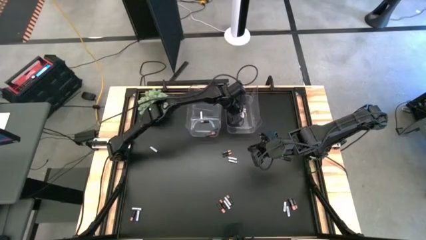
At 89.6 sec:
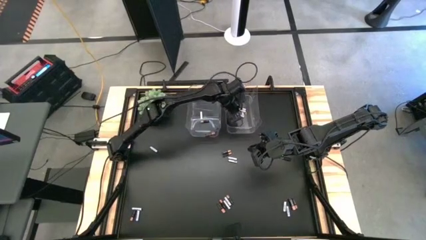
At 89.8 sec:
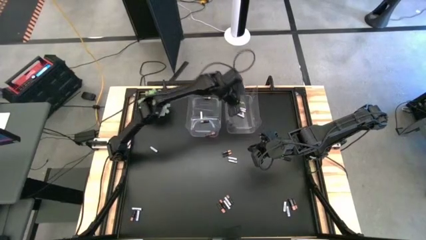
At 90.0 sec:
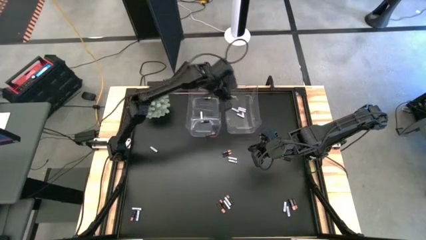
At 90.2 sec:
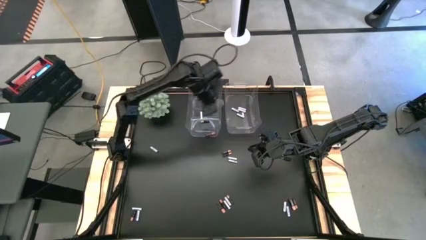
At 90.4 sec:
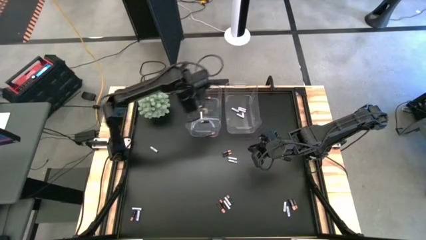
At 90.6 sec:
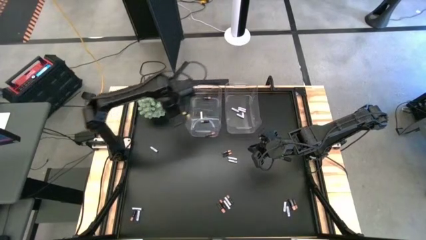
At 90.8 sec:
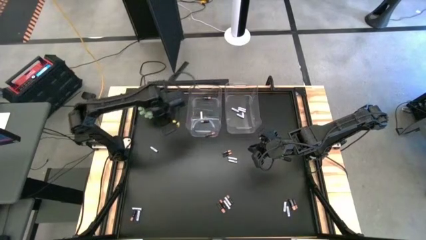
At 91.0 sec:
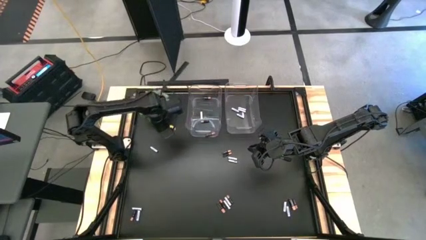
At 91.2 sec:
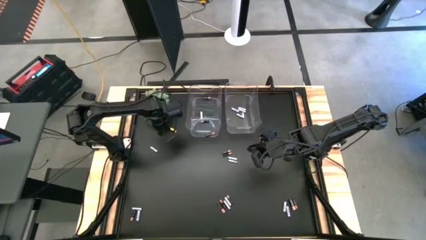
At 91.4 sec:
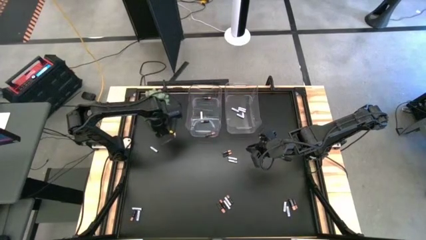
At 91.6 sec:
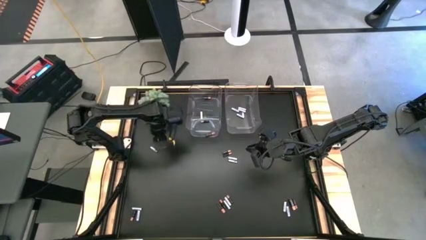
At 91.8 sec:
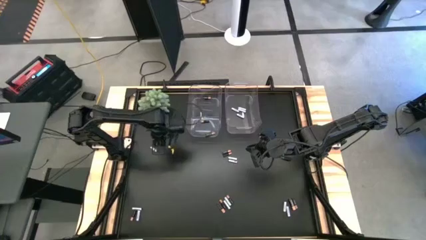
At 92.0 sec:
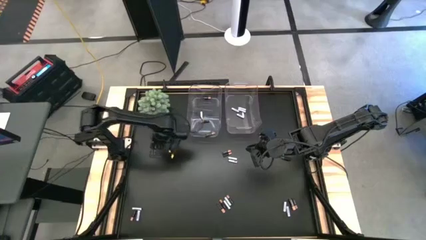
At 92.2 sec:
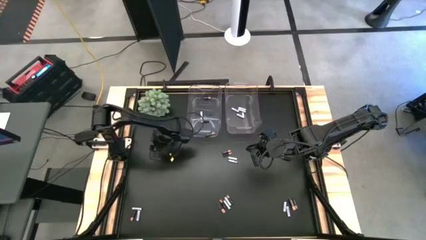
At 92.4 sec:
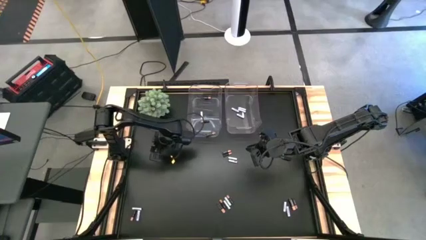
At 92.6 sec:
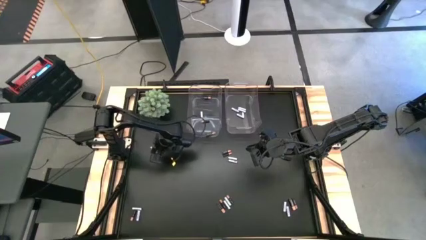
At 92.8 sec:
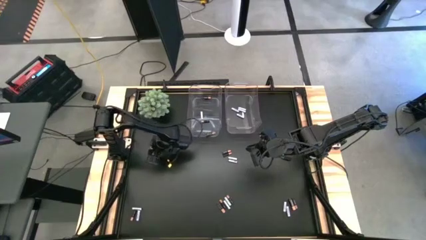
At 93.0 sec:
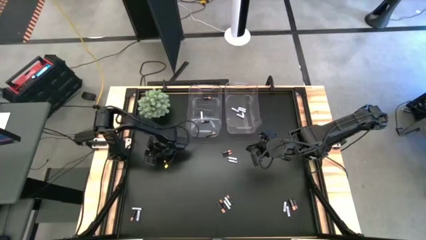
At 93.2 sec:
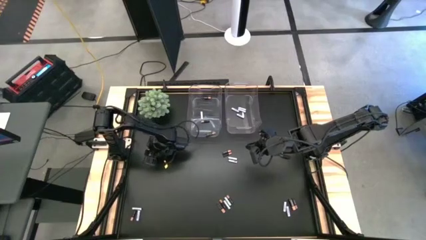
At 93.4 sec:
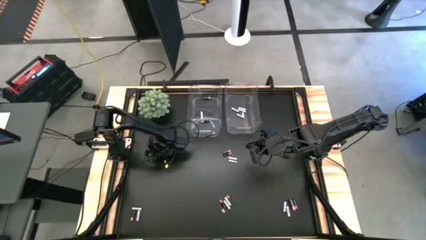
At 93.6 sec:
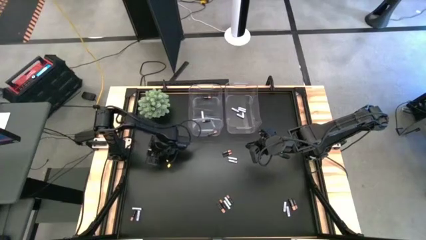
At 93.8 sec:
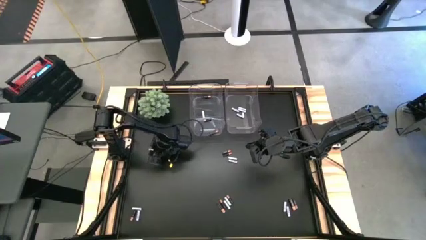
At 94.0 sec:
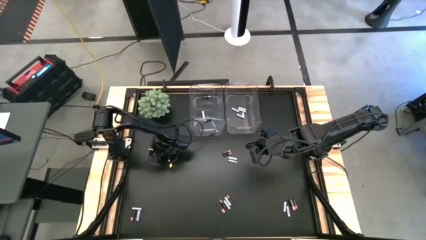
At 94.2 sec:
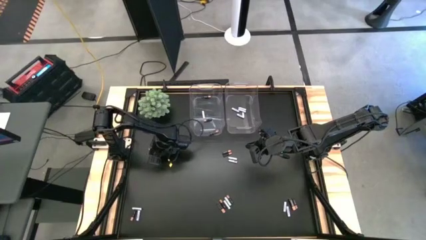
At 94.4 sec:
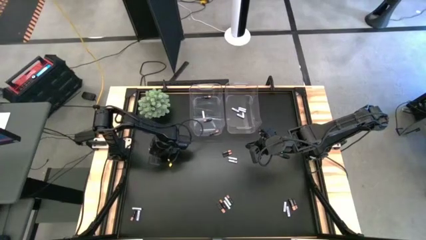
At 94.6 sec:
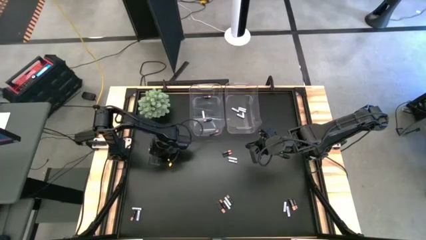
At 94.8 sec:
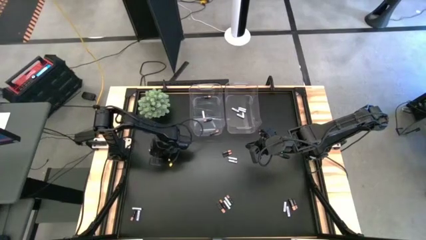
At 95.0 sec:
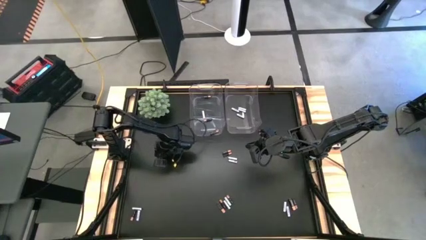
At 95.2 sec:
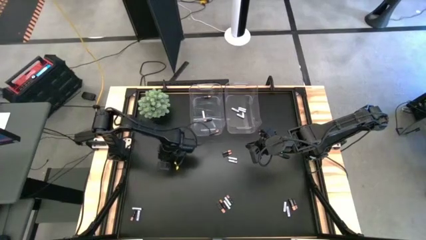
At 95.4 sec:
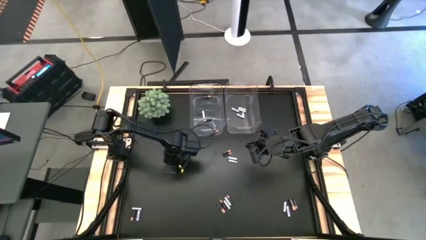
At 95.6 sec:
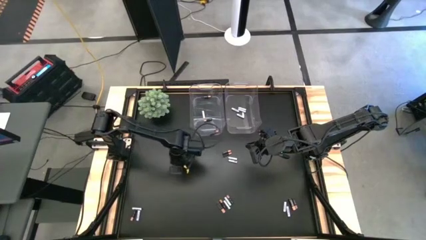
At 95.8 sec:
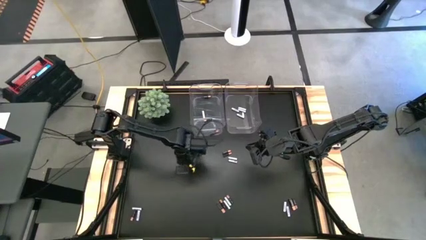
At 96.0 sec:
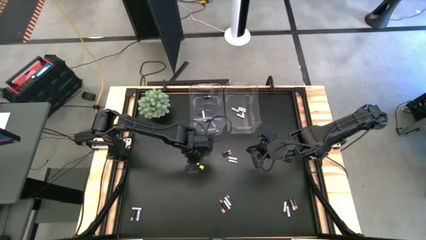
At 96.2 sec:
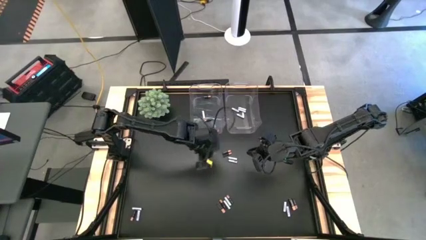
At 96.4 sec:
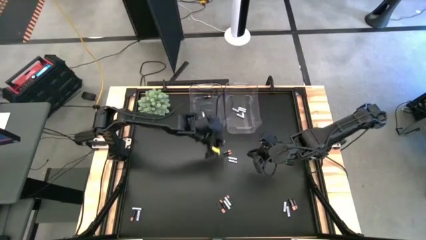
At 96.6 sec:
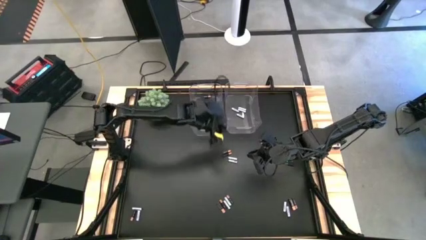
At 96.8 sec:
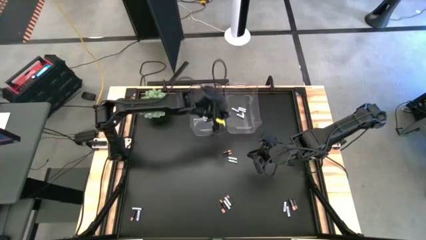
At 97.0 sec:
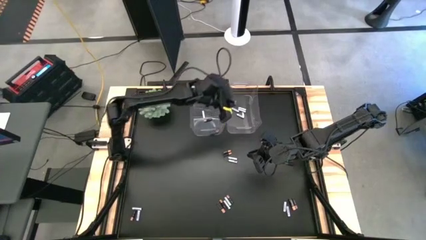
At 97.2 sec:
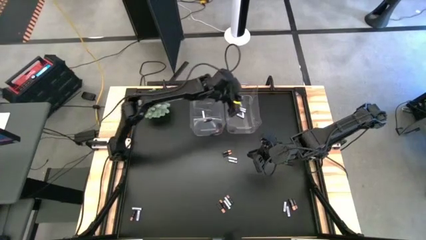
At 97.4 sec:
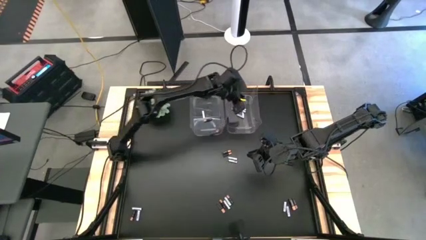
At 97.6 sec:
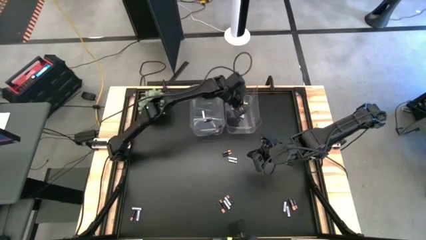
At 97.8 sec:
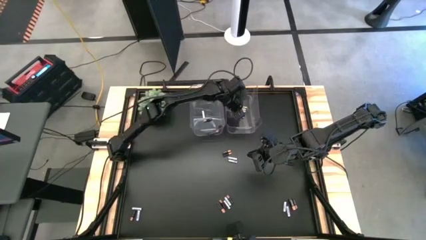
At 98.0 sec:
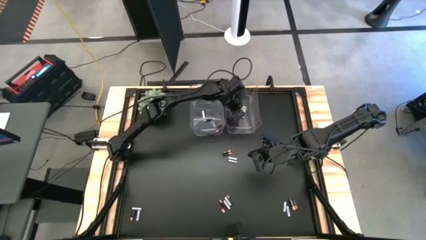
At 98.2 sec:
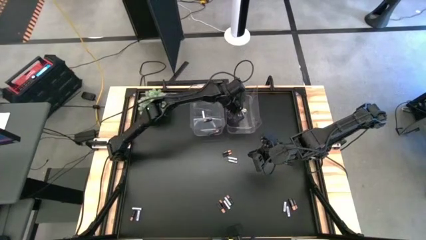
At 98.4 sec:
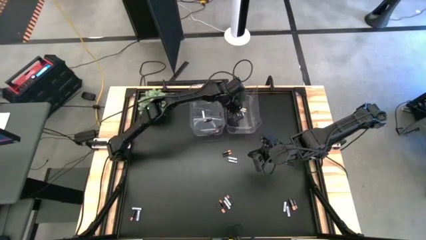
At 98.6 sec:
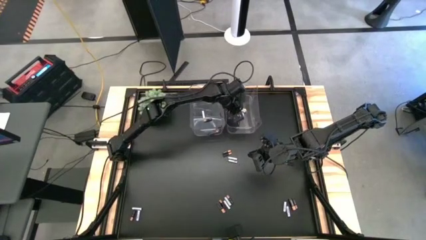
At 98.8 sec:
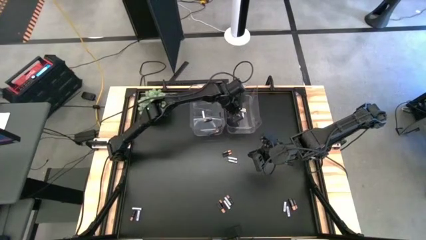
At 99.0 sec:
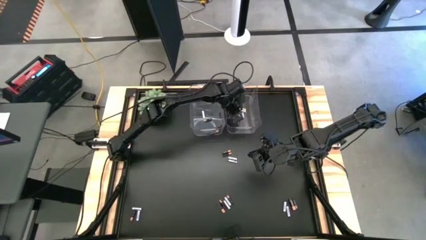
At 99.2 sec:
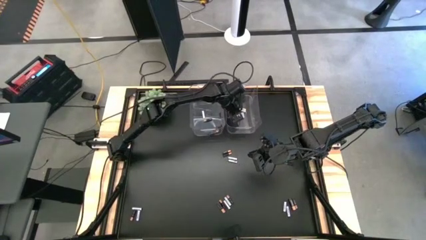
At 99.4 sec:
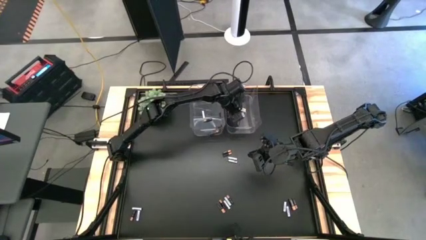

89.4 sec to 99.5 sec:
Task: Sort batteries
Put the white battery into the right transparent bin

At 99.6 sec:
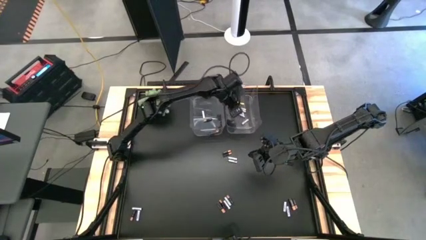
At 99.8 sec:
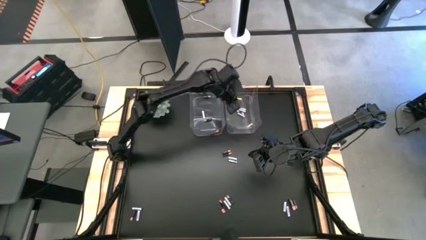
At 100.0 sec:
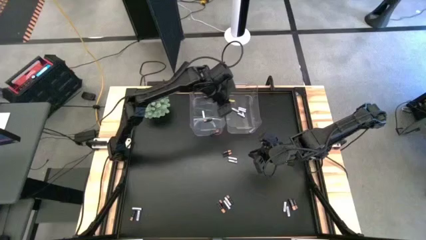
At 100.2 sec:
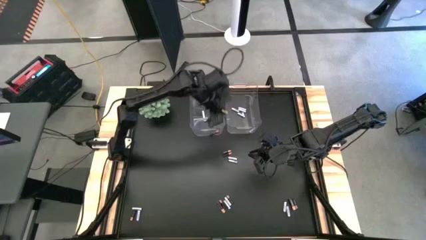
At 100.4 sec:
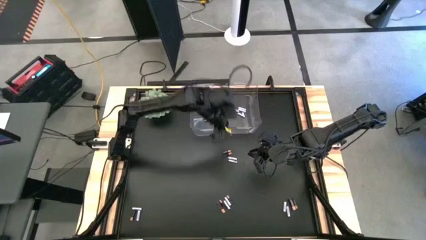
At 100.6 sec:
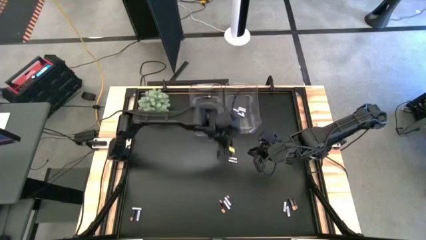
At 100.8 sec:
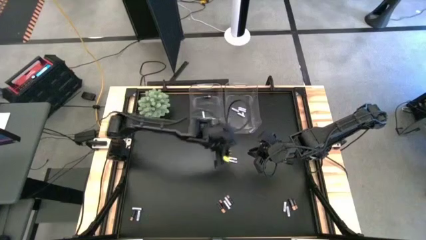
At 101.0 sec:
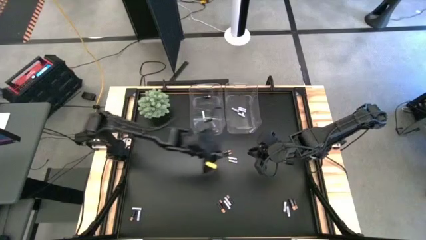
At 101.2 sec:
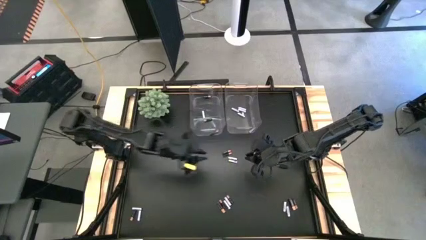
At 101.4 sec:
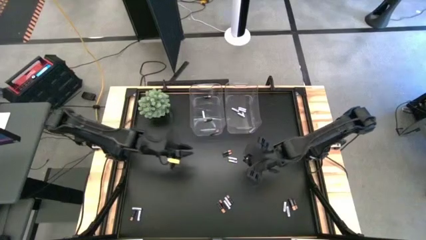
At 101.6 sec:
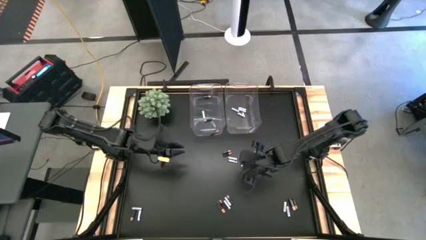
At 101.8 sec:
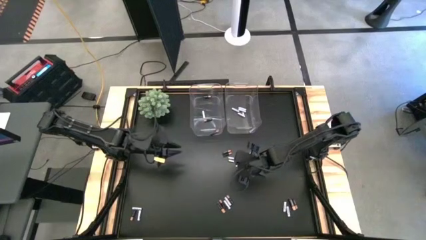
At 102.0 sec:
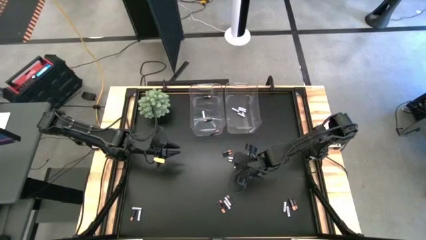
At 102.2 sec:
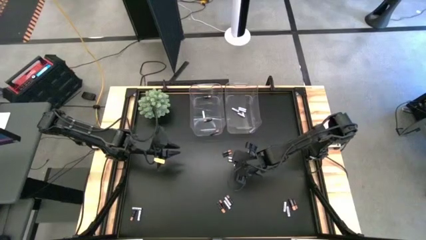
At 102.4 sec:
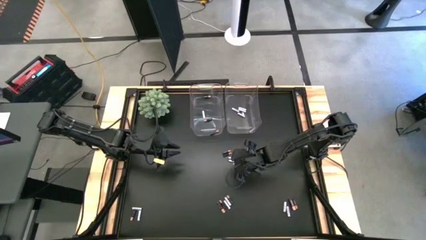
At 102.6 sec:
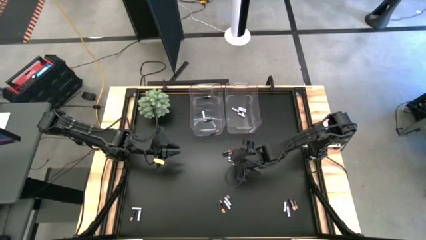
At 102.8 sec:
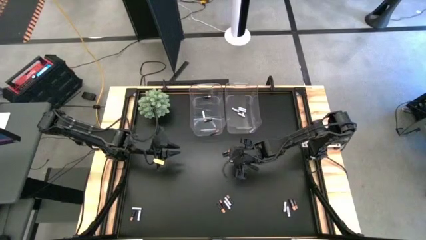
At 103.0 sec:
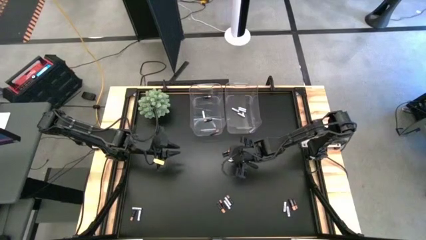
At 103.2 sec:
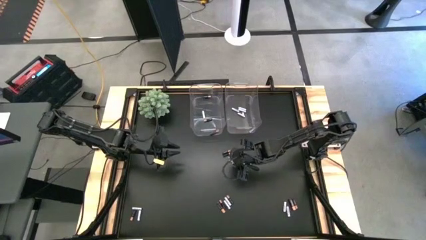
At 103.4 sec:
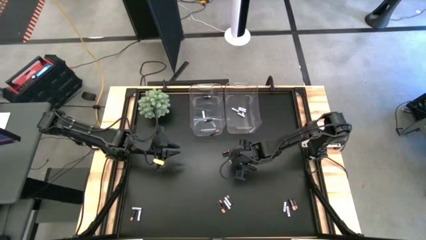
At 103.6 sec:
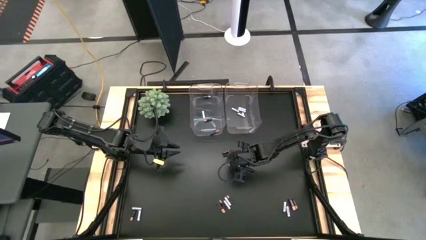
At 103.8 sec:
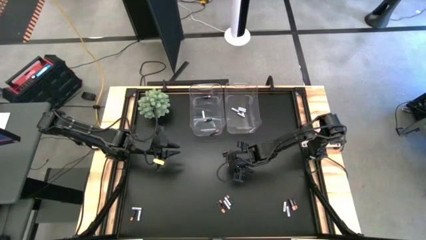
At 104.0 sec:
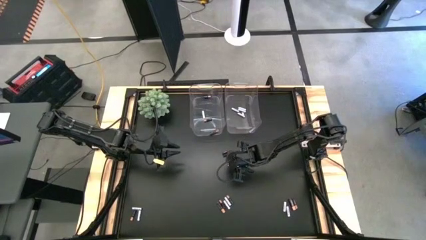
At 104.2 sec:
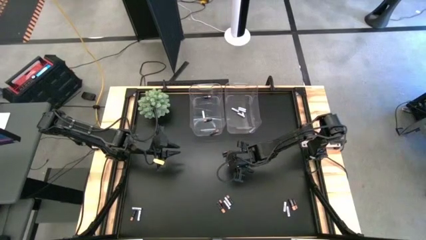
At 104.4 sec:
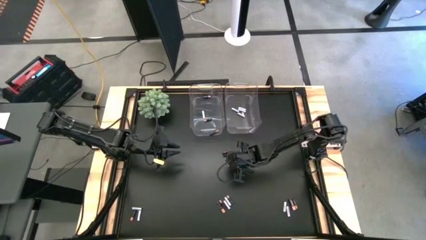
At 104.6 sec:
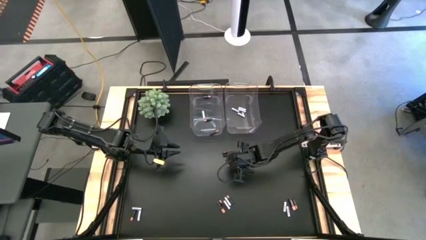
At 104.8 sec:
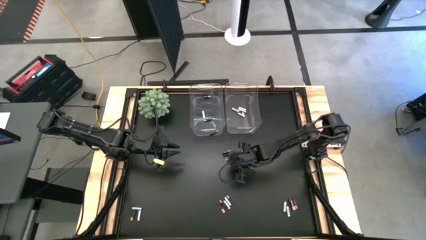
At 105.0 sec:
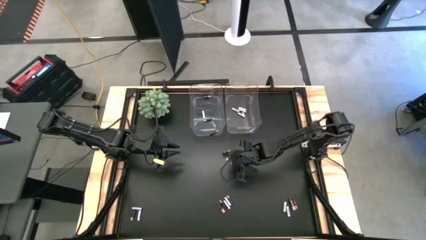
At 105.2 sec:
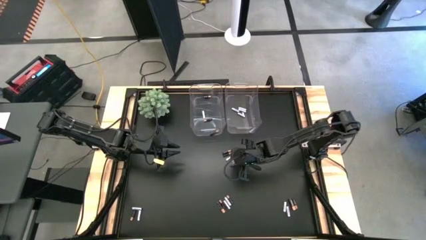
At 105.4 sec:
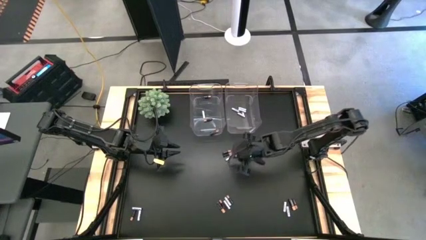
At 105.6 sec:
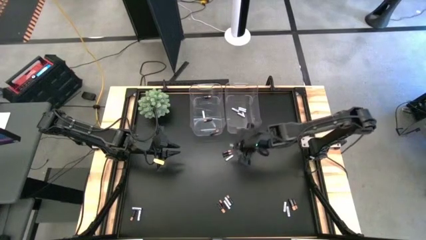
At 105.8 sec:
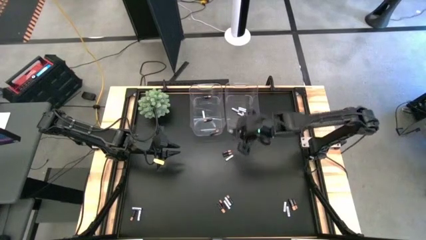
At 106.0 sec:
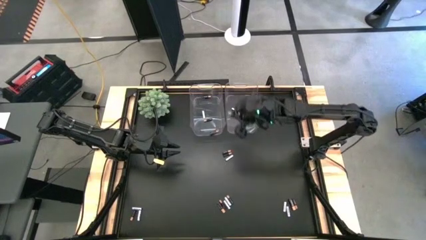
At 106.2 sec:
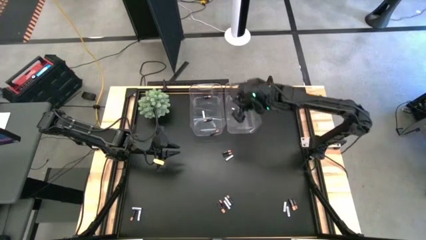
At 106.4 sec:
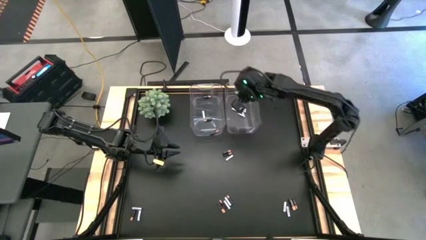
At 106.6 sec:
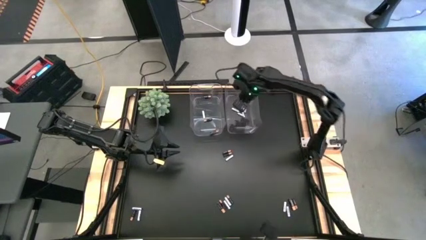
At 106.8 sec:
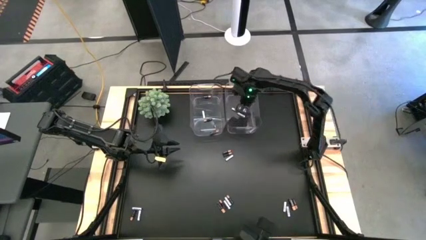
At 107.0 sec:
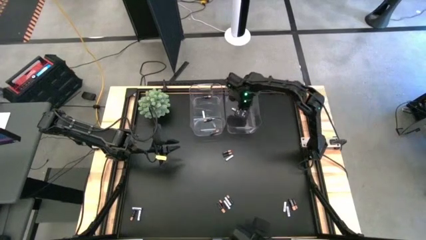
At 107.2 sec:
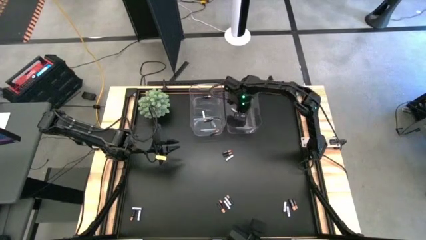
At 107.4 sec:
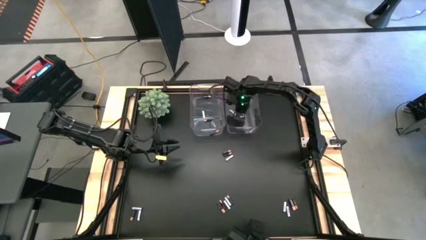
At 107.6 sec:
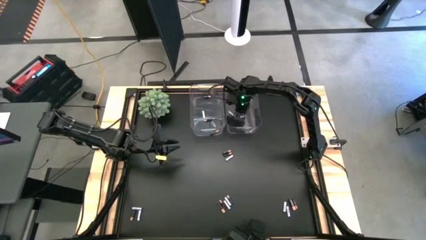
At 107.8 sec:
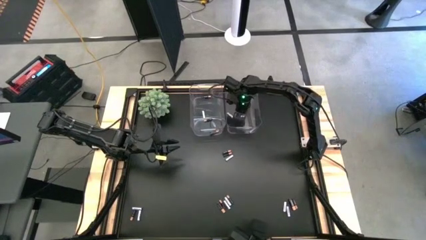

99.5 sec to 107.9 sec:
Put the white battery into the right transparent bin
